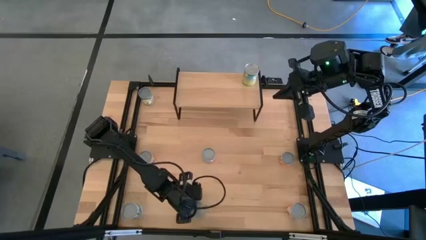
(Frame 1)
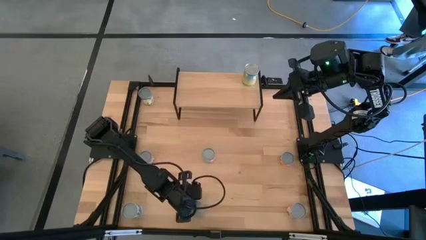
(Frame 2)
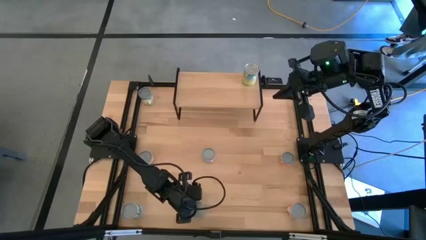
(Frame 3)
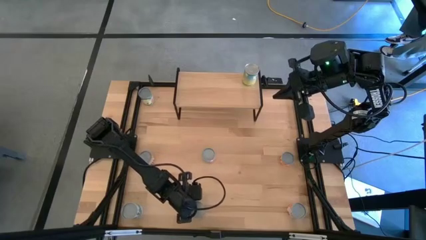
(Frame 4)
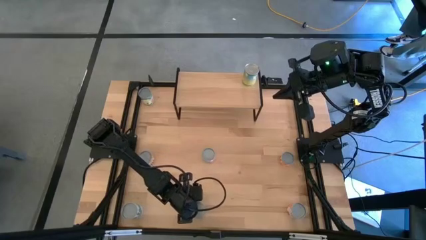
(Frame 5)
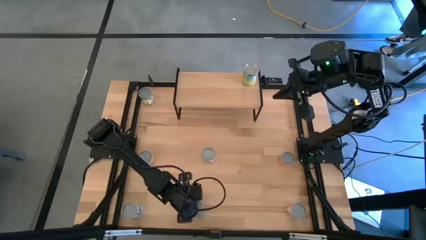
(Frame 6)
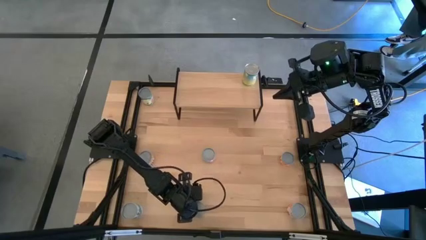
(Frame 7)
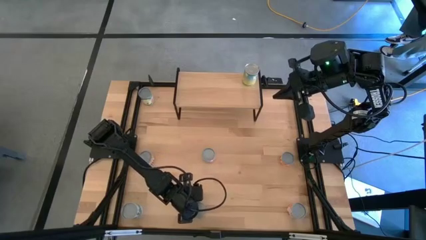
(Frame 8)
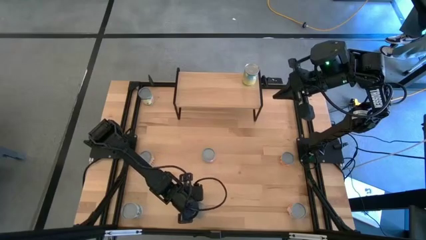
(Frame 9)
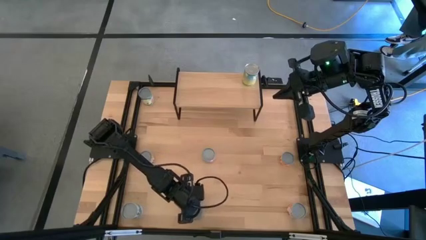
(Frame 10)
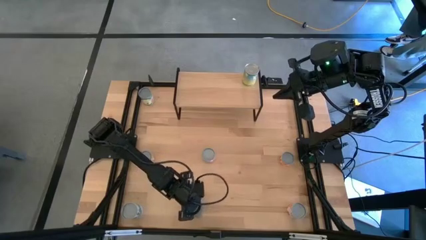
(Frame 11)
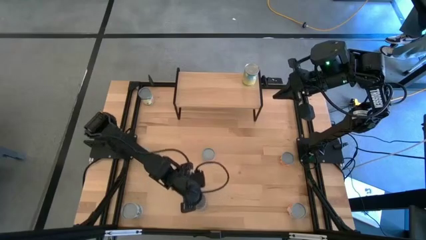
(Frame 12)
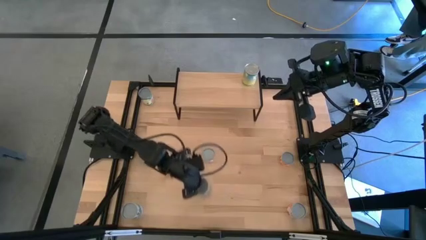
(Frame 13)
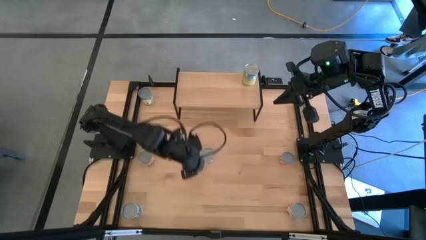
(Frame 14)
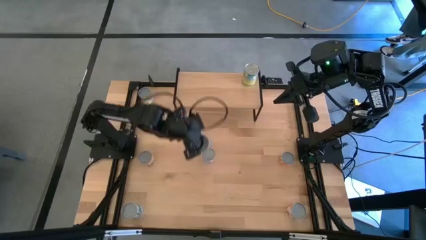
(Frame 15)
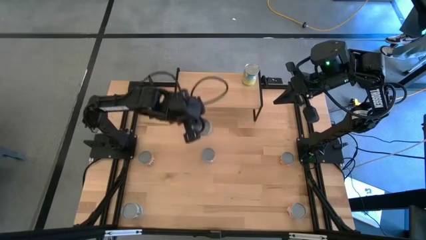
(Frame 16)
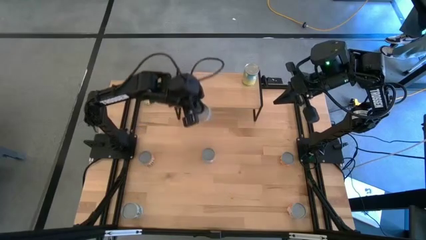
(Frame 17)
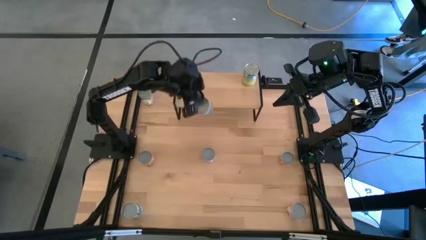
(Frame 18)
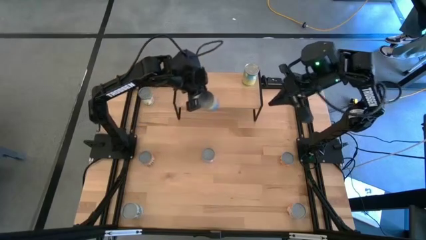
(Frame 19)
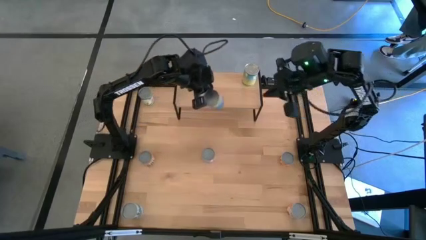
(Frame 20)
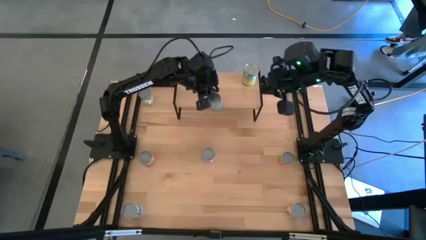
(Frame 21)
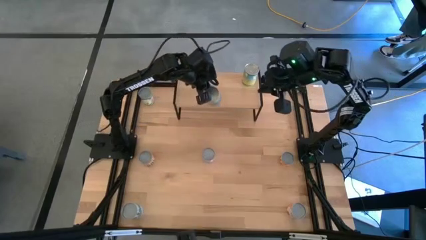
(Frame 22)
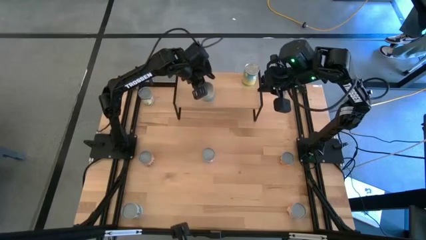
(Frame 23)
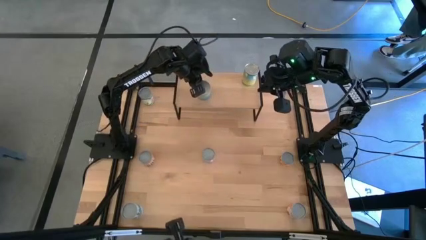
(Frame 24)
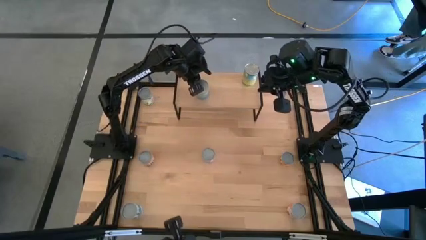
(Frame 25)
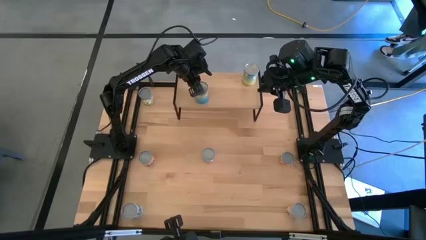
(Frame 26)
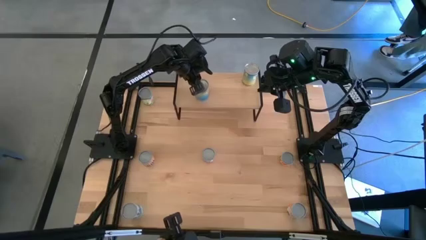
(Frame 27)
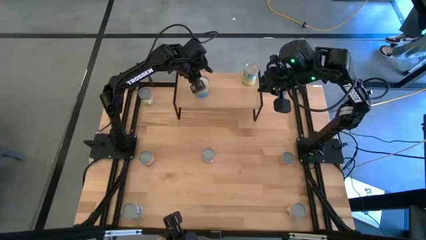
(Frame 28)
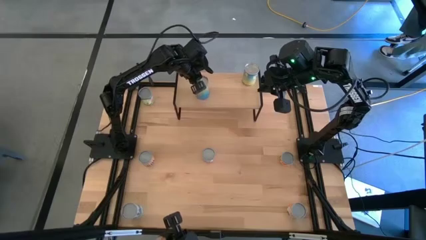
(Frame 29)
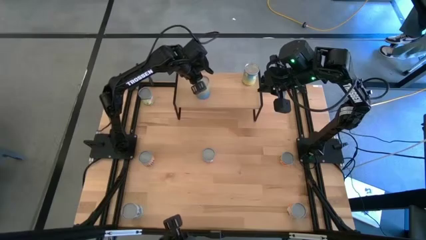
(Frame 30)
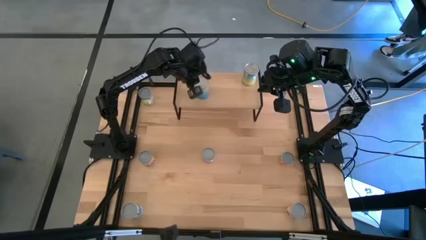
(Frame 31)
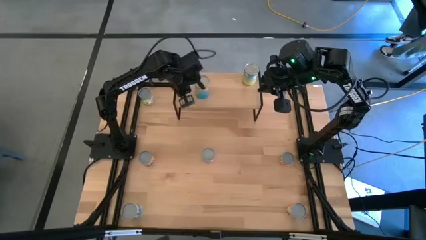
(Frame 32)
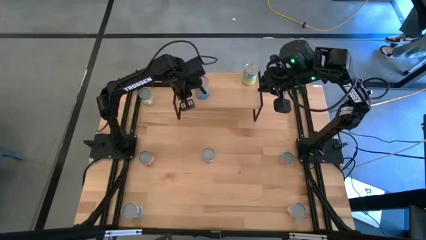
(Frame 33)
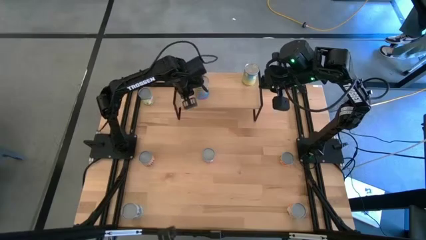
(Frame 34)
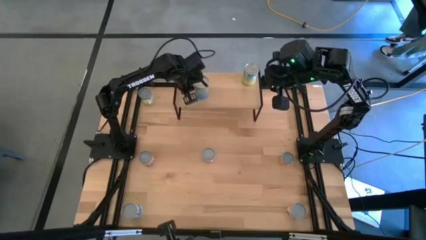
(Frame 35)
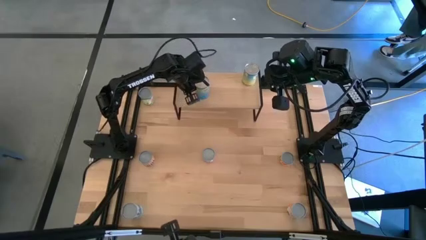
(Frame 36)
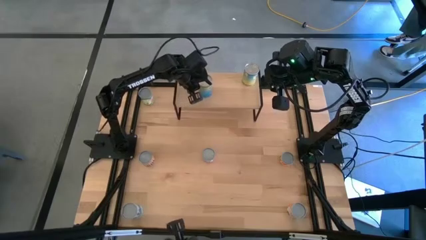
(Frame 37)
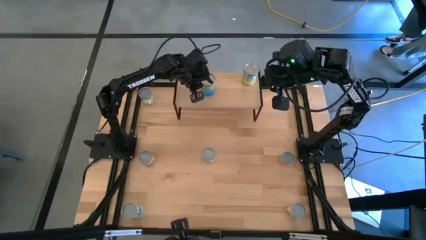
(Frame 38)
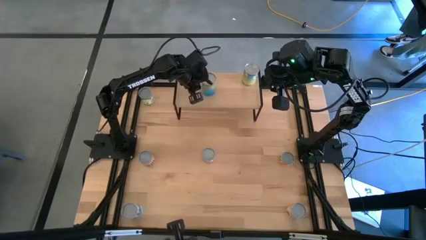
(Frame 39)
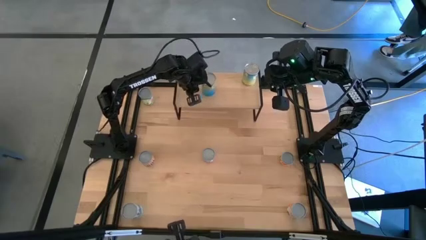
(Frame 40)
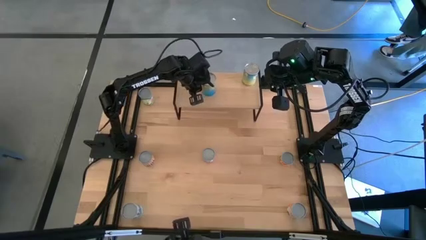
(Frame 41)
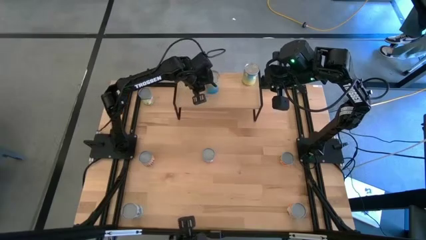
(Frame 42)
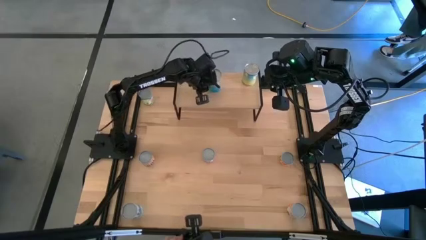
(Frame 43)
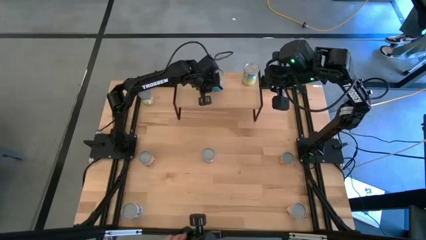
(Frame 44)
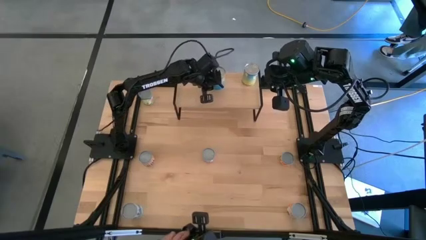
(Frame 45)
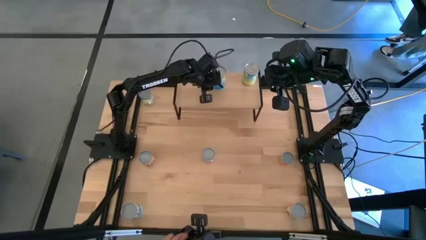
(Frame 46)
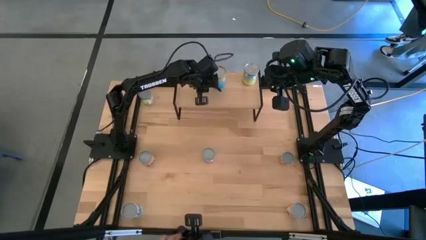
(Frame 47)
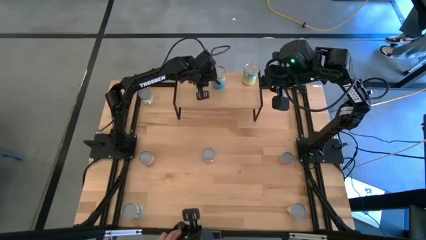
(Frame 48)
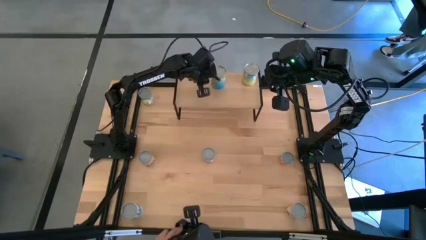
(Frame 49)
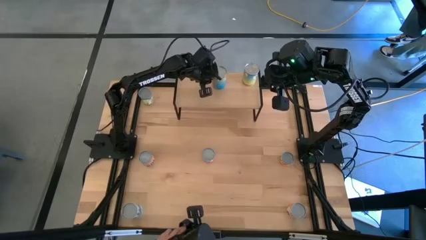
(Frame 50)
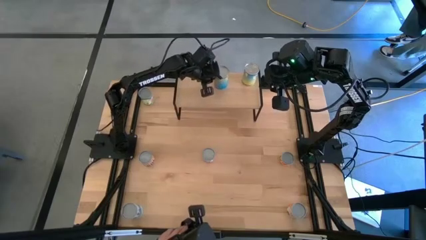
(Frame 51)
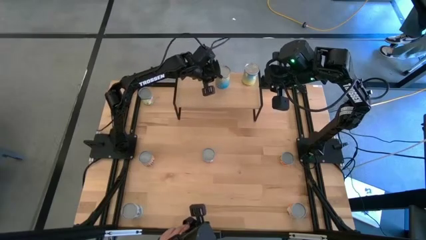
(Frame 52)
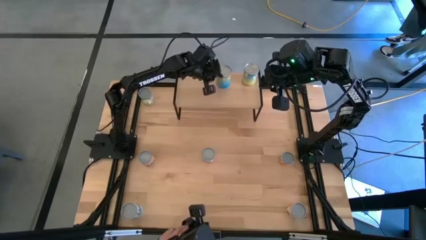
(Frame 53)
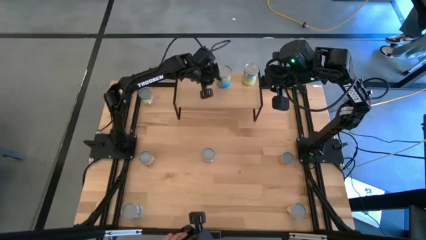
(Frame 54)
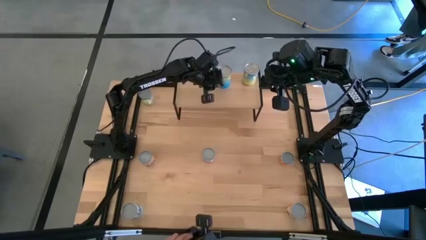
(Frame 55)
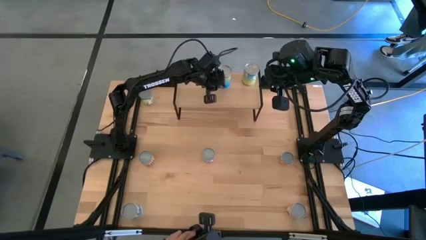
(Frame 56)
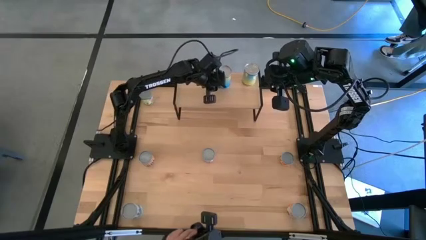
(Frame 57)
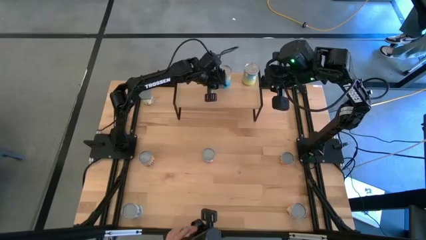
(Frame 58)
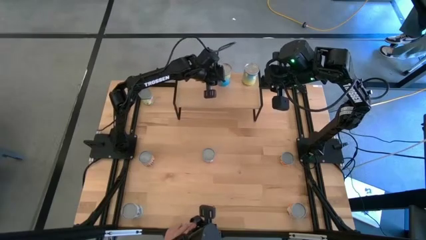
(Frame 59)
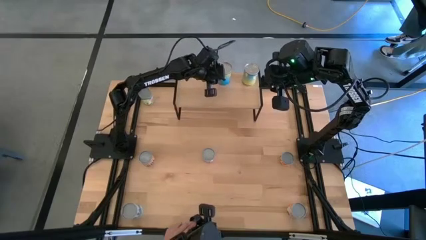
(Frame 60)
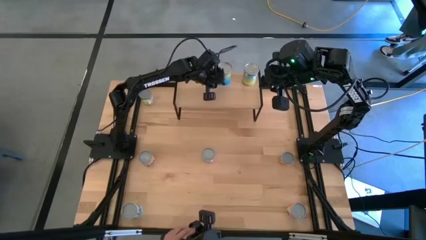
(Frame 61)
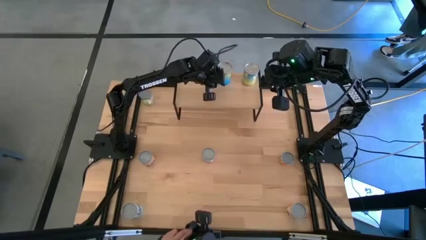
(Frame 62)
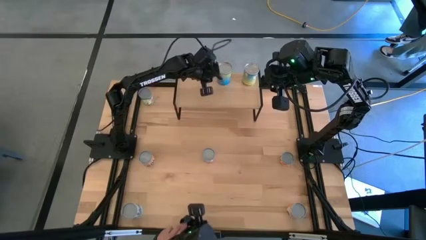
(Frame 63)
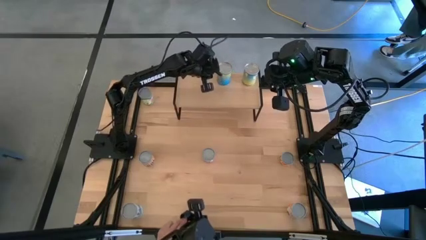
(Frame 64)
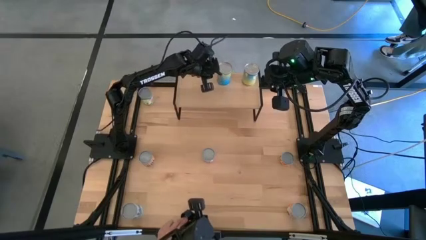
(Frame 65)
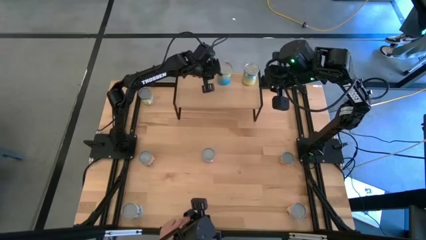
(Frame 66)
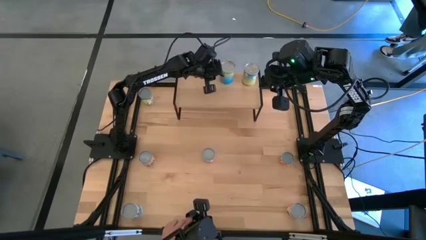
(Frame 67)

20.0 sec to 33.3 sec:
Task: Pick and place cans onto a shelf
Put the canned cherries on the shelf
